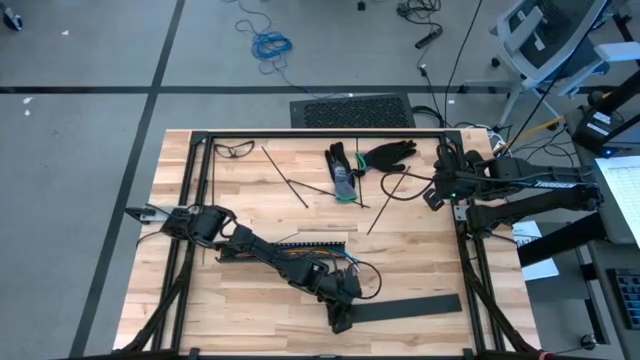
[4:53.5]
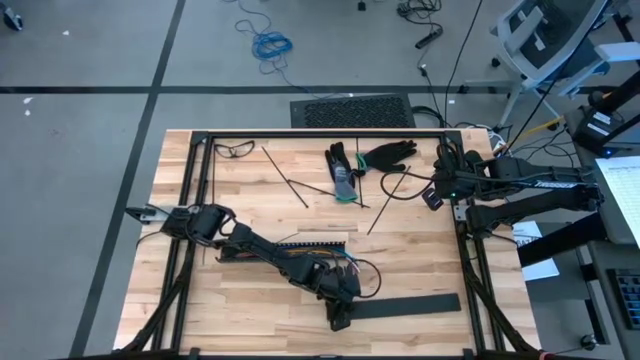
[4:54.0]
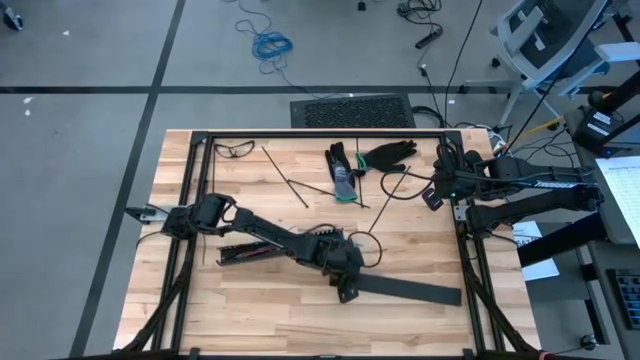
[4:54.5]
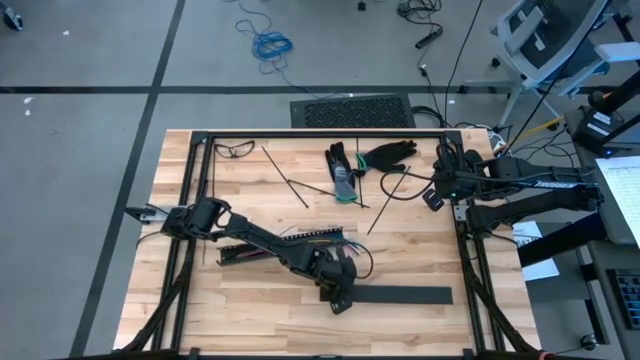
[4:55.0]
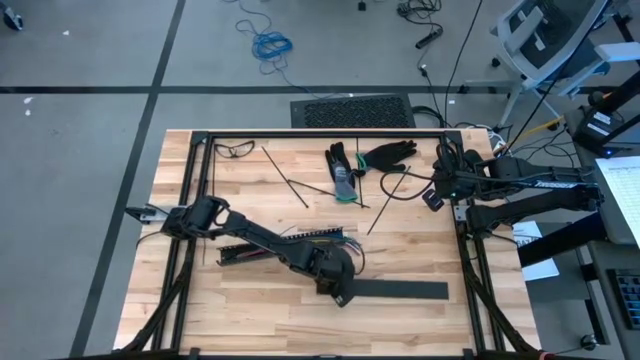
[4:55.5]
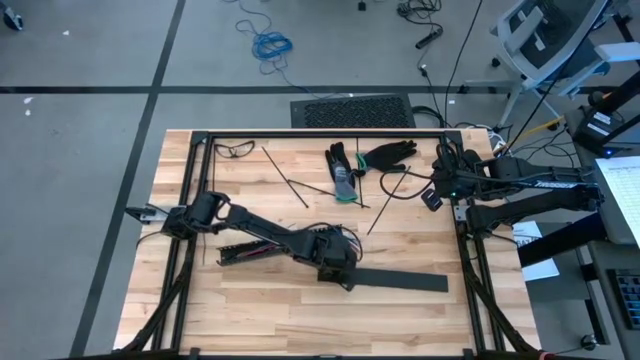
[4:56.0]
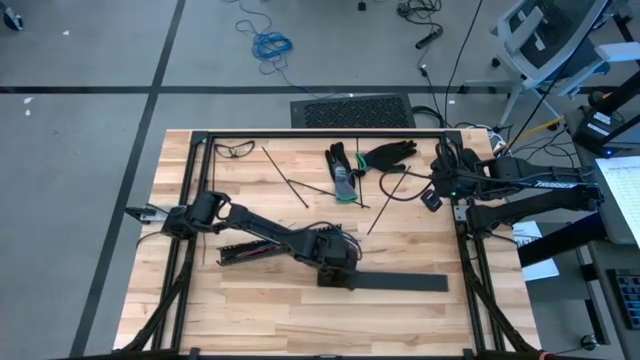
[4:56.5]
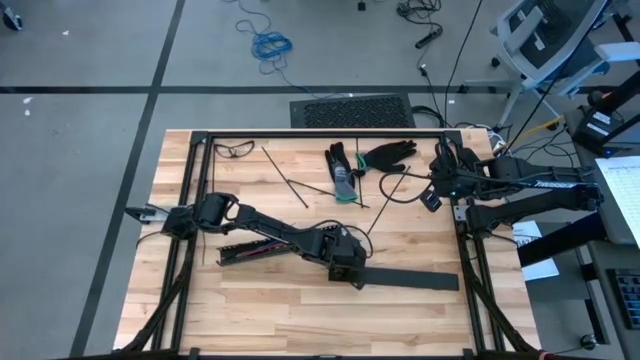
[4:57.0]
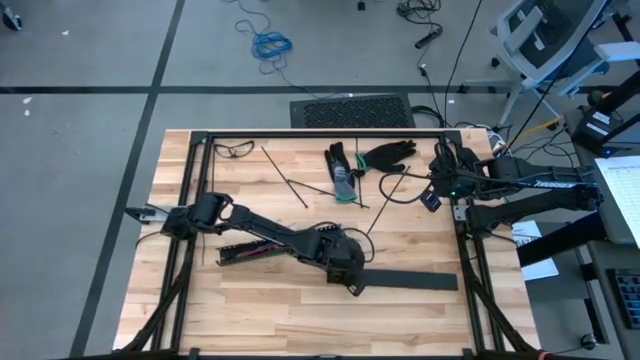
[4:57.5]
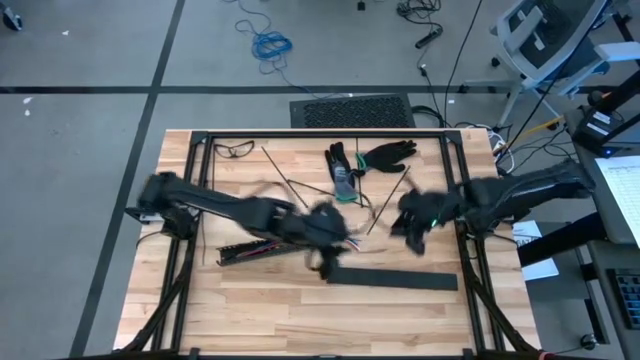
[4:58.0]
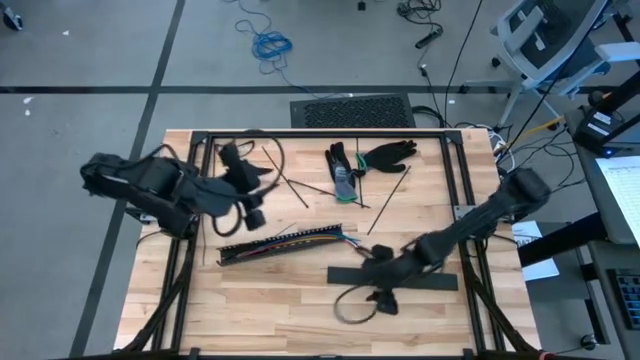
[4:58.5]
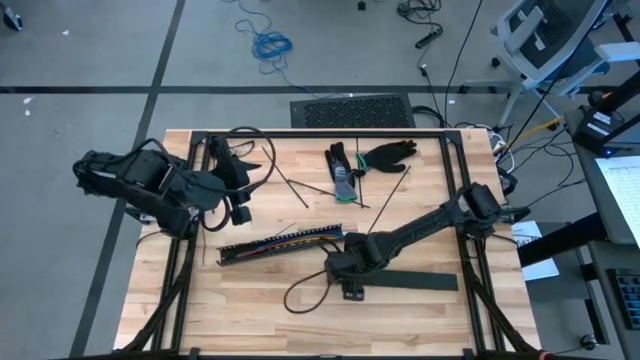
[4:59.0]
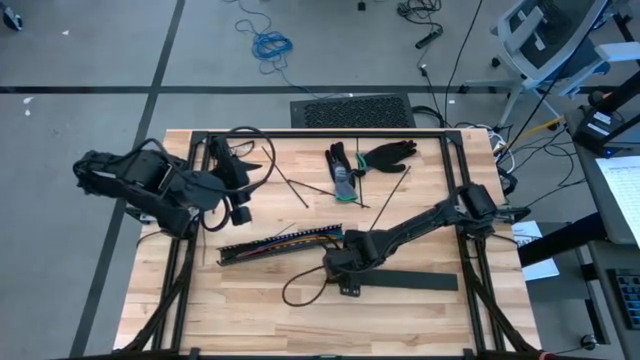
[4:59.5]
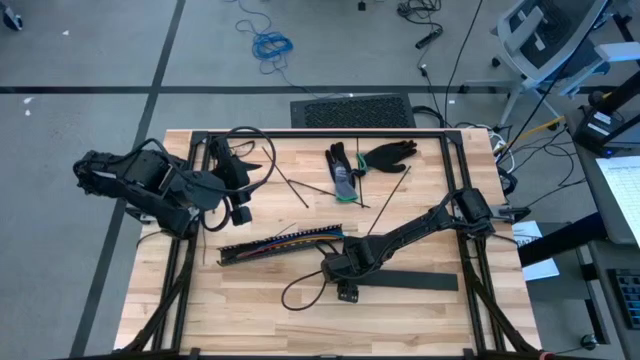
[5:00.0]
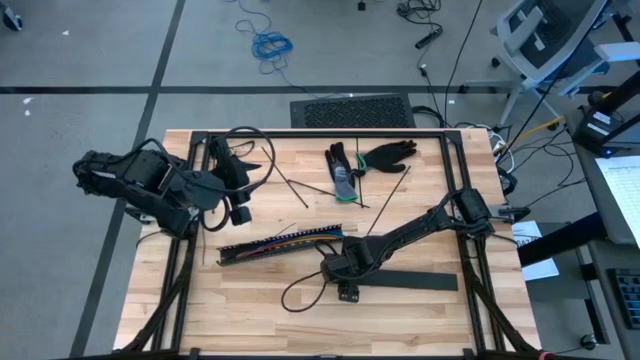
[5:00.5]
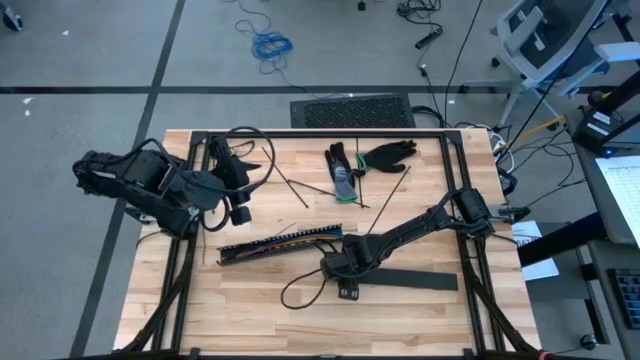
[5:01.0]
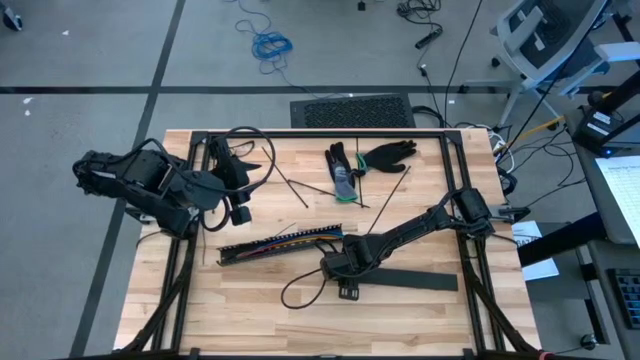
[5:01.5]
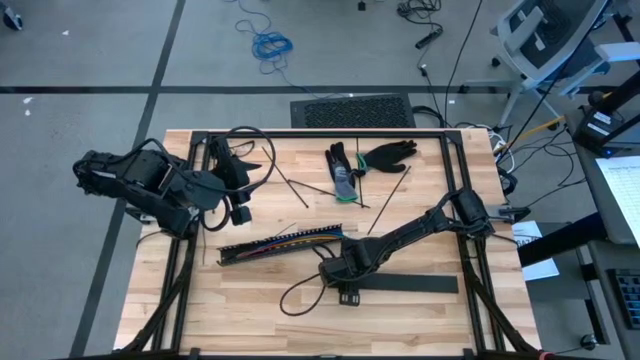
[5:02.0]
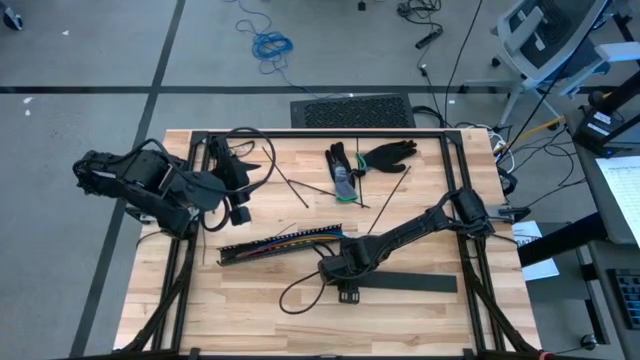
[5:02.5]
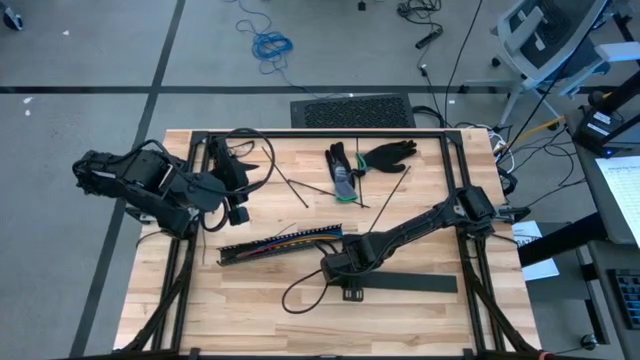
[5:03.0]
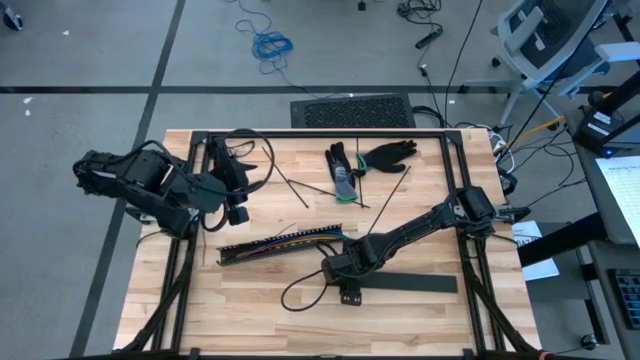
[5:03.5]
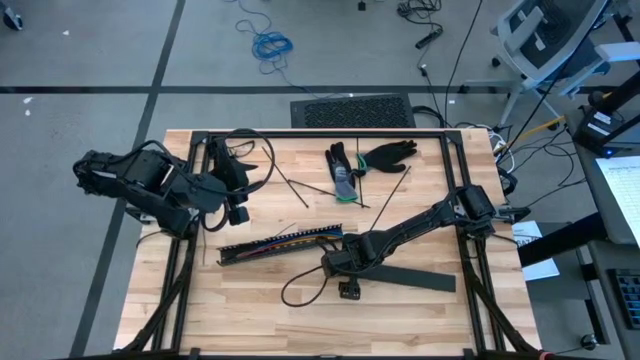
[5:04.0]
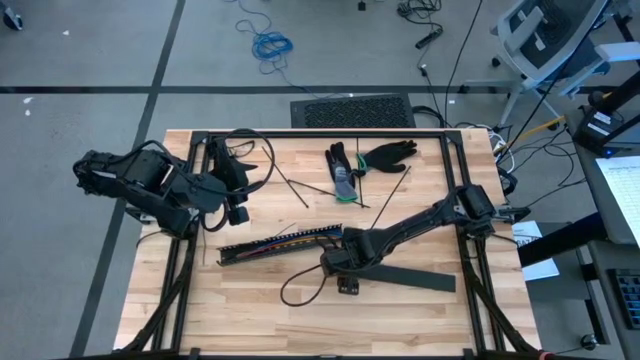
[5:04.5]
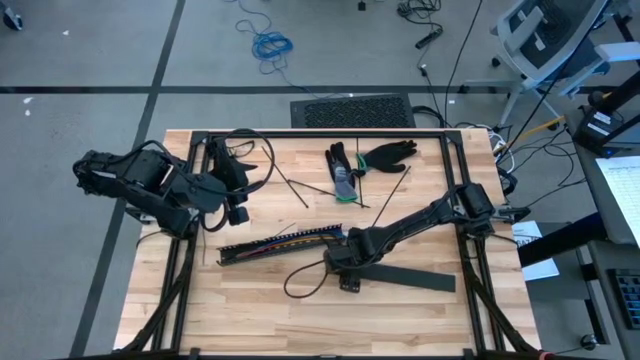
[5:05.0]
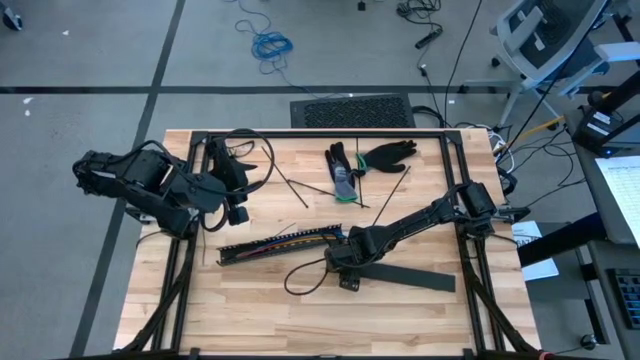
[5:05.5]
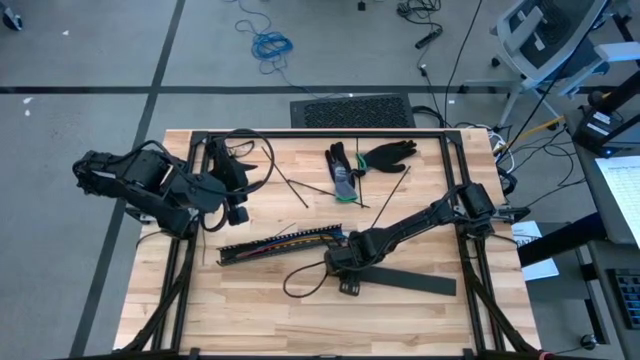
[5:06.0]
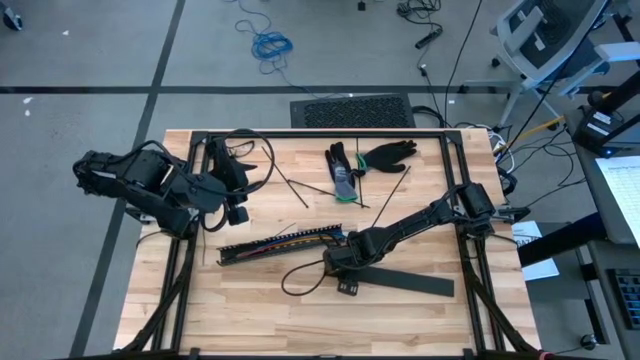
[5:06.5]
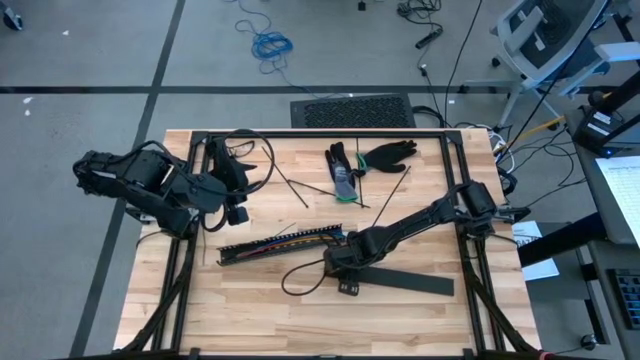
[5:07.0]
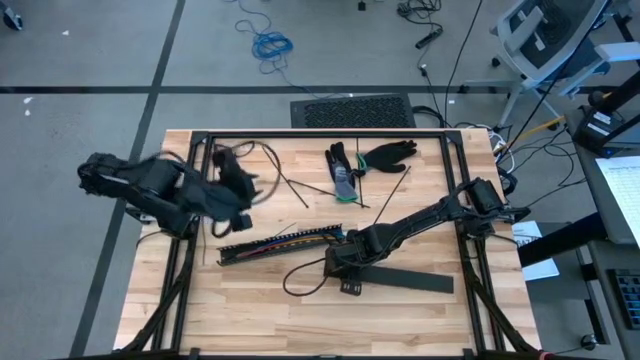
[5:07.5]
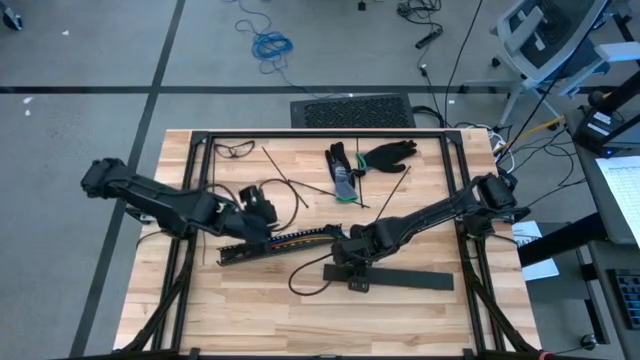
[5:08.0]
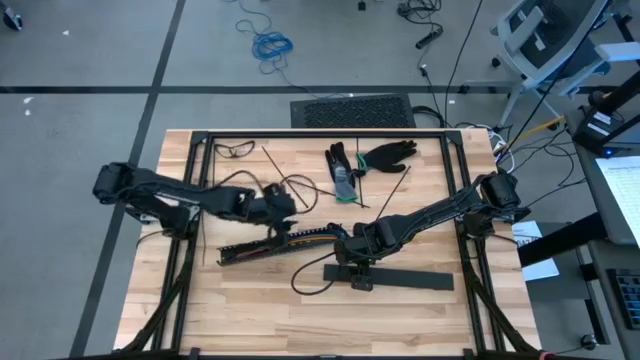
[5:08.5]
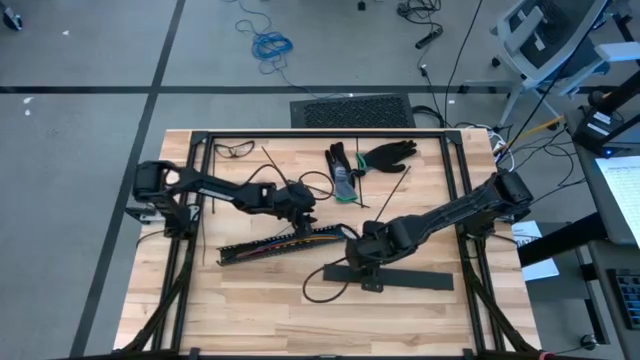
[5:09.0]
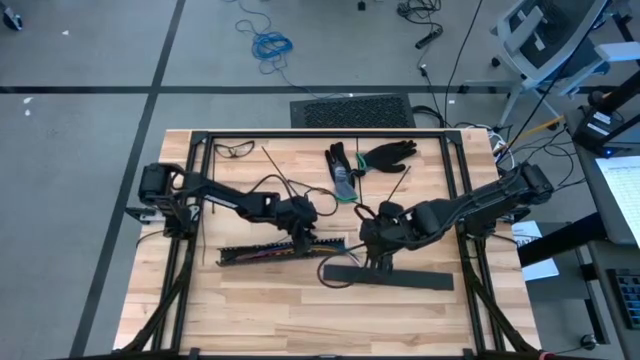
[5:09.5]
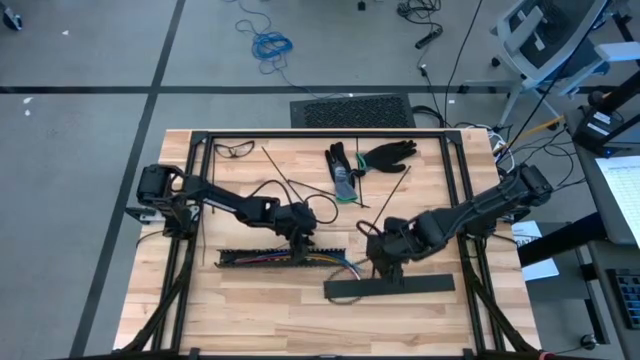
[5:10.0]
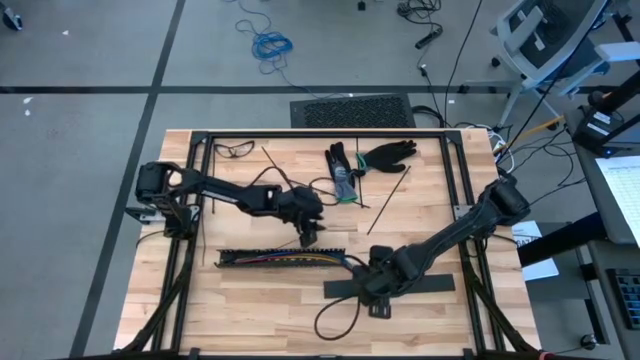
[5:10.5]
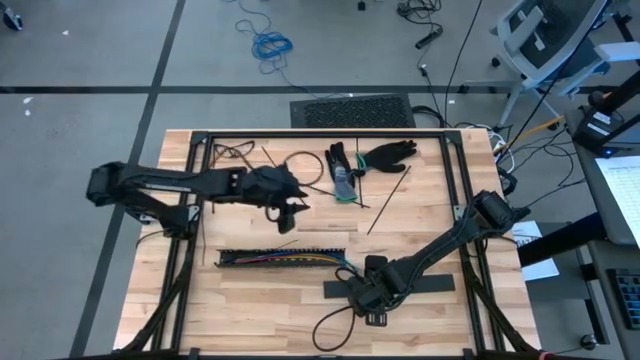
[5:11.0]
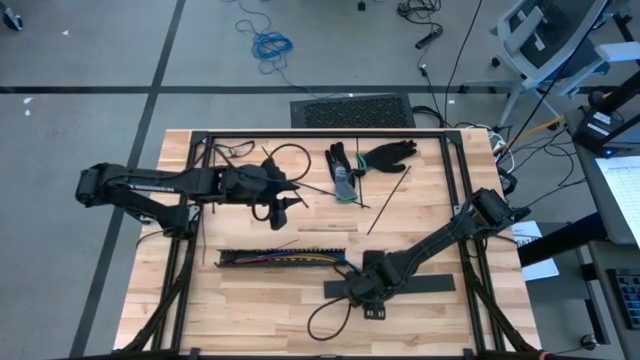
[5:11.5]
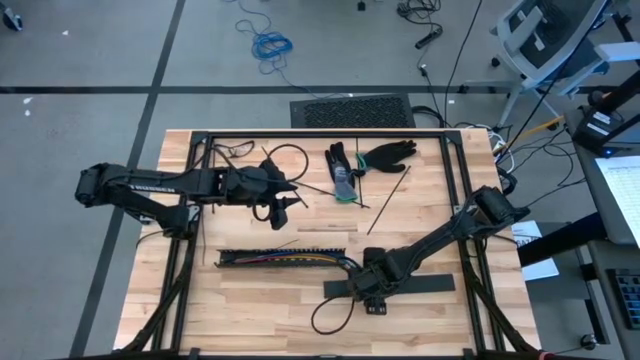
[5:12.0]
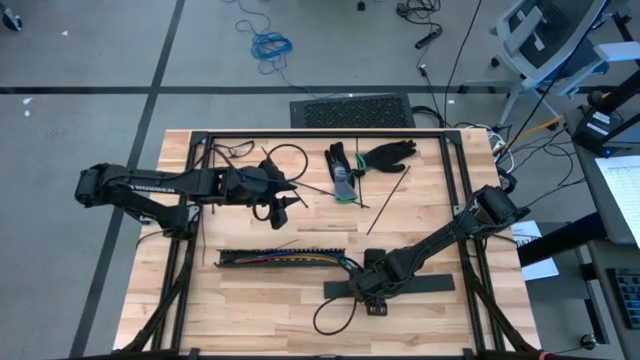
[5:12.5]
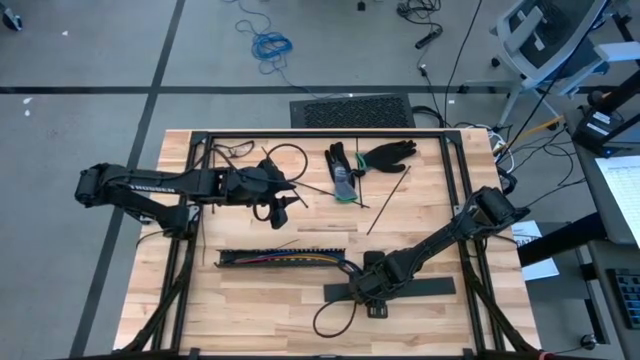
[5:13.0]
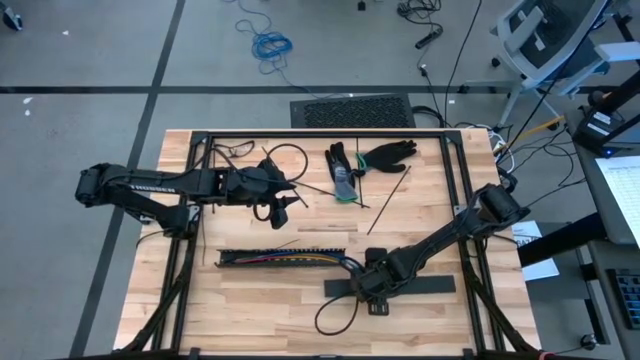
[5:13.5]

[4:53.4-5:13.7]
Task: Ziptie cables
Close the black cable duct
